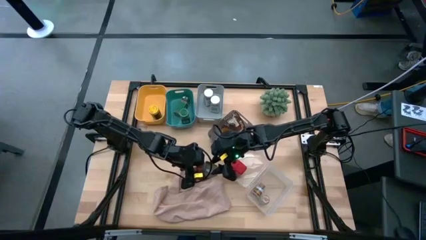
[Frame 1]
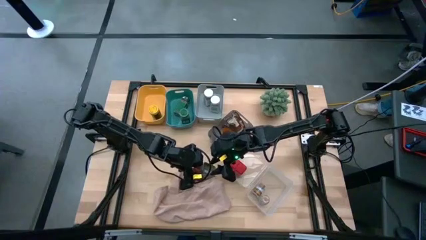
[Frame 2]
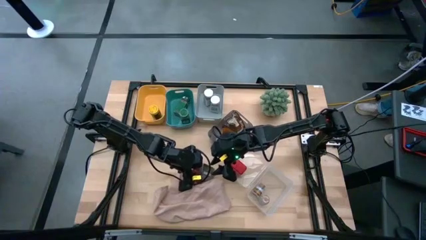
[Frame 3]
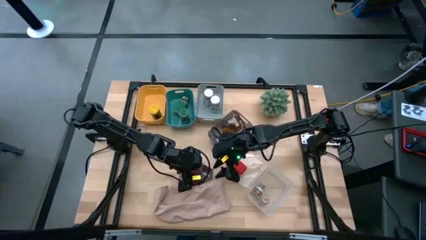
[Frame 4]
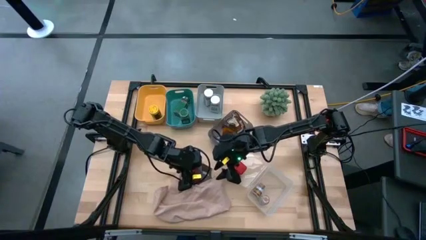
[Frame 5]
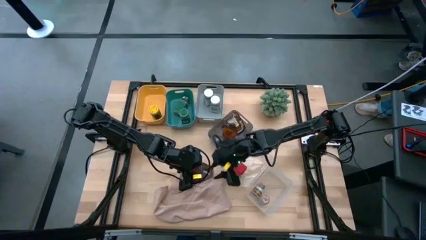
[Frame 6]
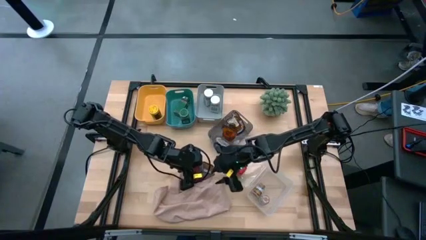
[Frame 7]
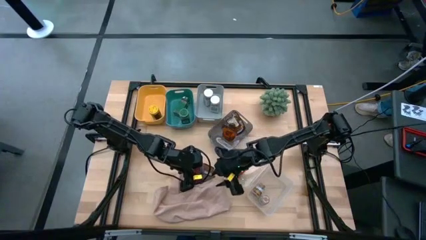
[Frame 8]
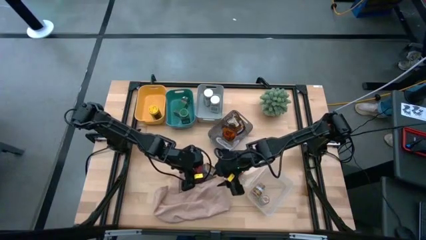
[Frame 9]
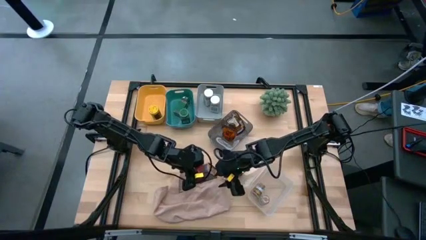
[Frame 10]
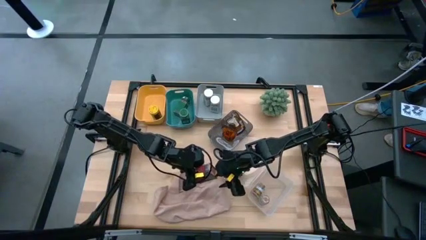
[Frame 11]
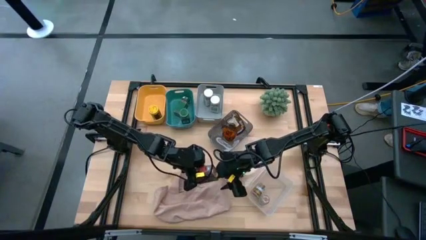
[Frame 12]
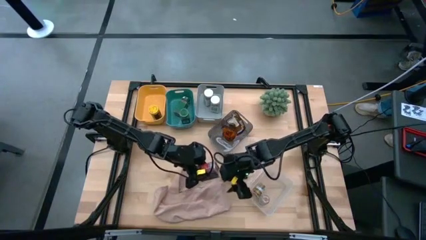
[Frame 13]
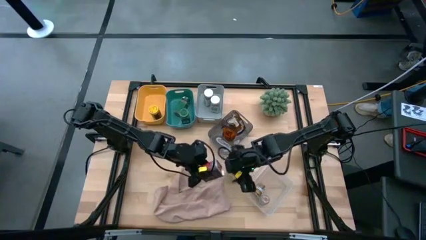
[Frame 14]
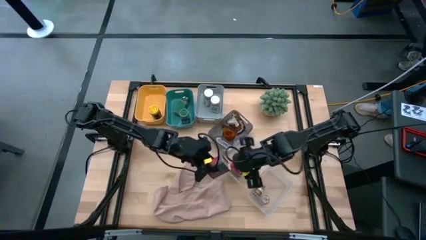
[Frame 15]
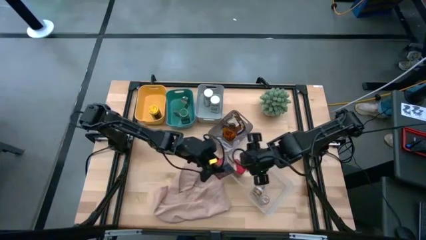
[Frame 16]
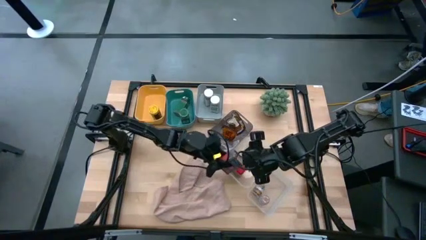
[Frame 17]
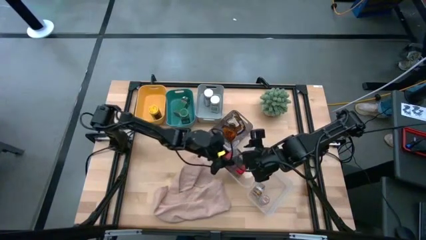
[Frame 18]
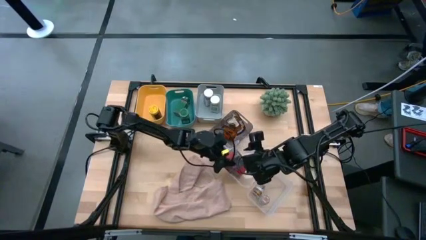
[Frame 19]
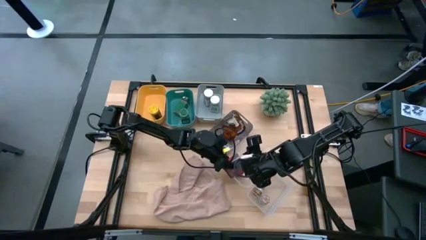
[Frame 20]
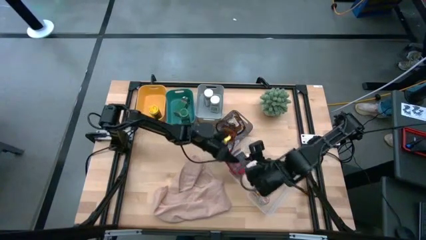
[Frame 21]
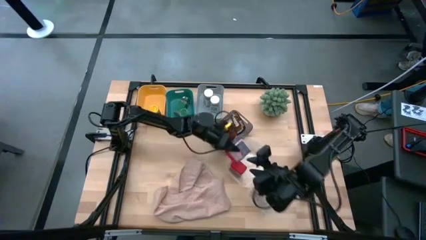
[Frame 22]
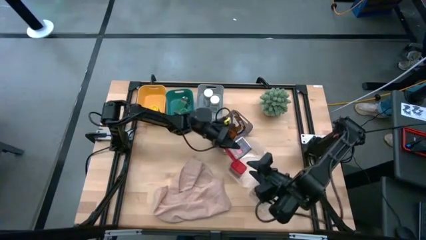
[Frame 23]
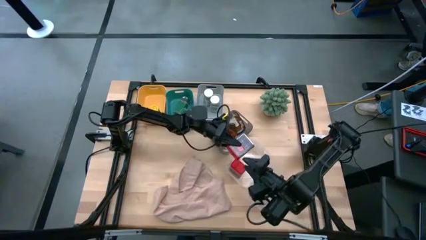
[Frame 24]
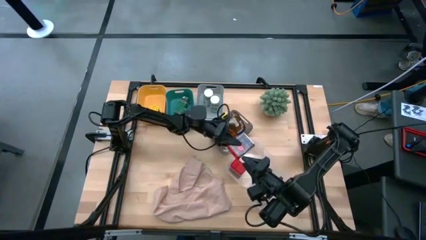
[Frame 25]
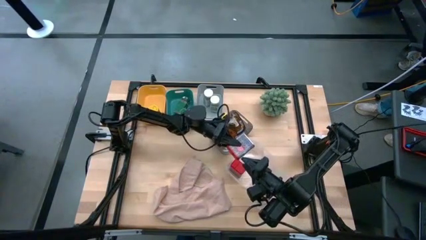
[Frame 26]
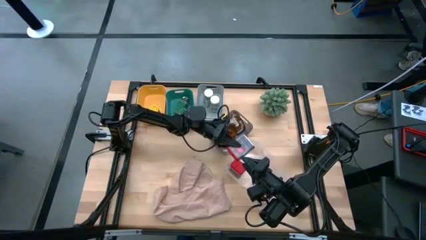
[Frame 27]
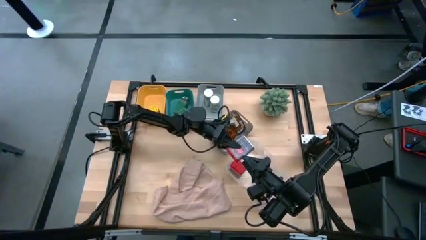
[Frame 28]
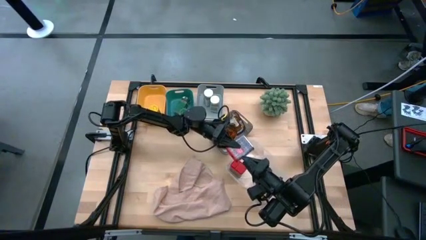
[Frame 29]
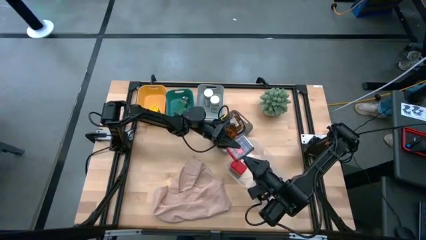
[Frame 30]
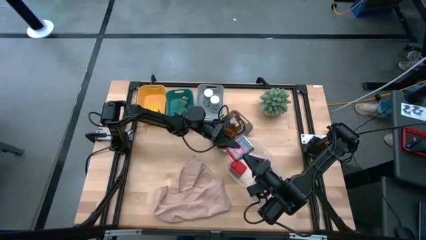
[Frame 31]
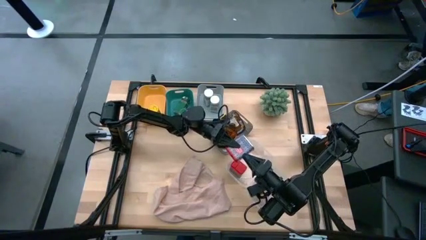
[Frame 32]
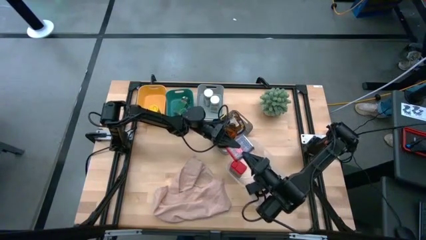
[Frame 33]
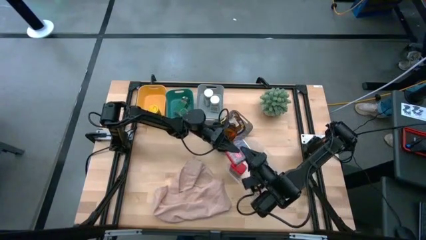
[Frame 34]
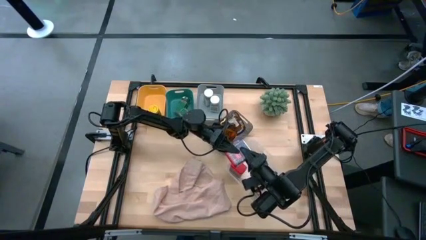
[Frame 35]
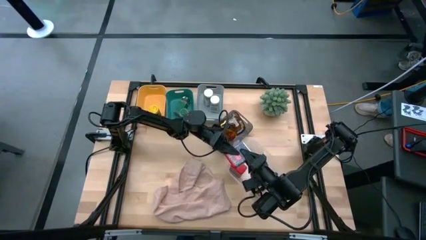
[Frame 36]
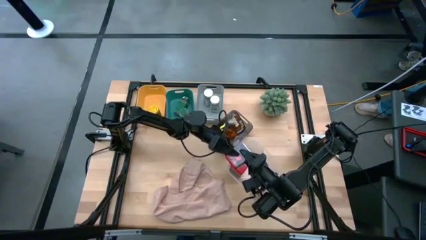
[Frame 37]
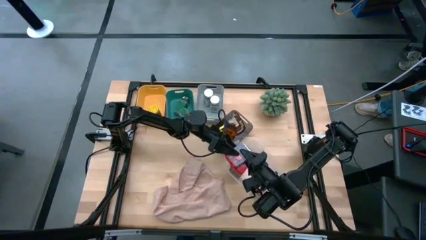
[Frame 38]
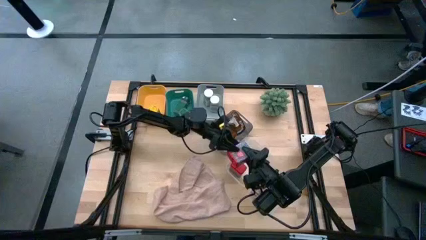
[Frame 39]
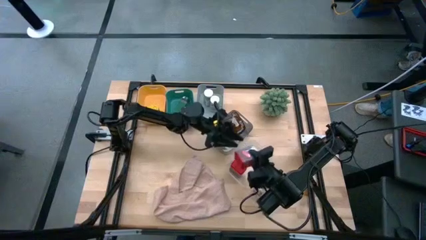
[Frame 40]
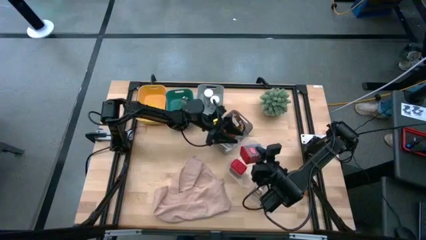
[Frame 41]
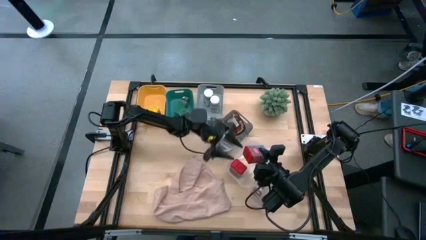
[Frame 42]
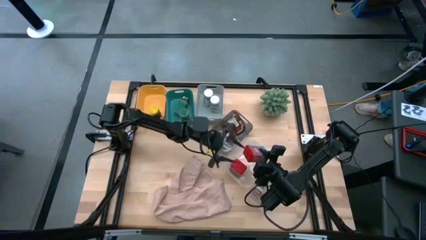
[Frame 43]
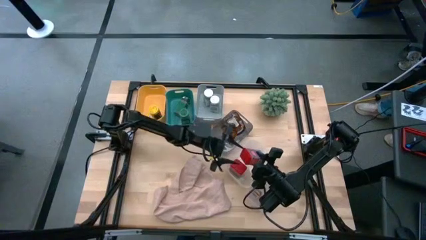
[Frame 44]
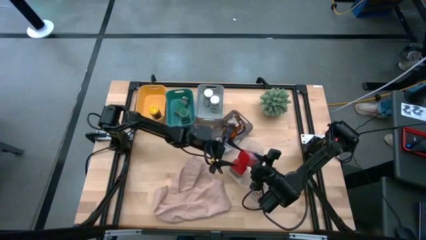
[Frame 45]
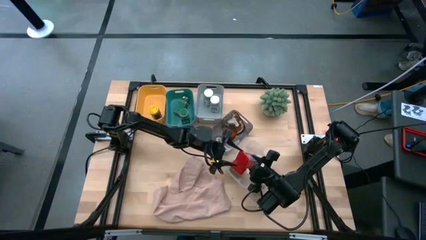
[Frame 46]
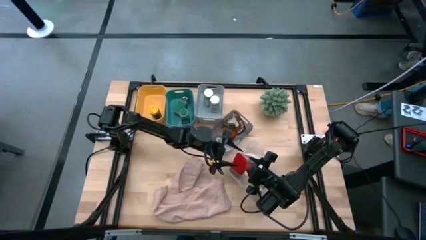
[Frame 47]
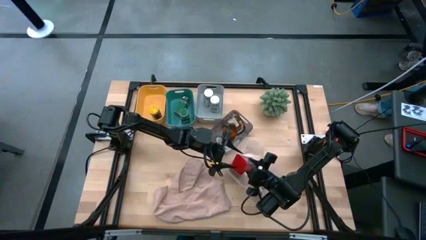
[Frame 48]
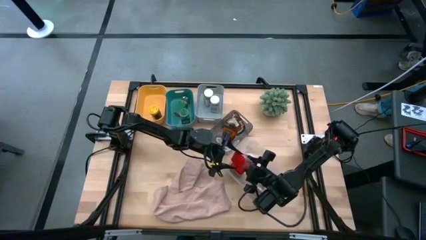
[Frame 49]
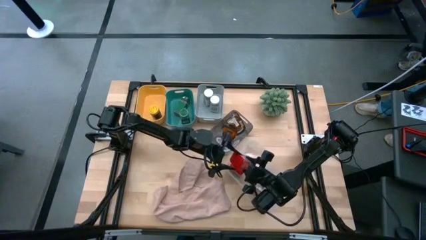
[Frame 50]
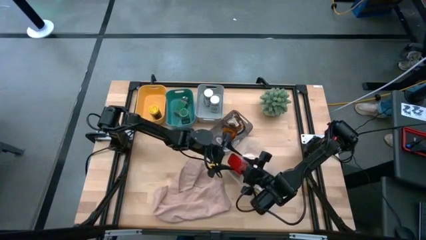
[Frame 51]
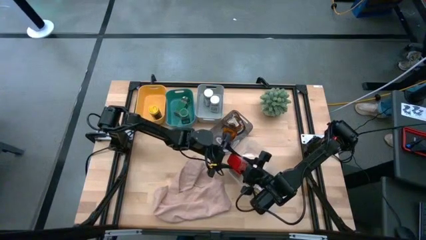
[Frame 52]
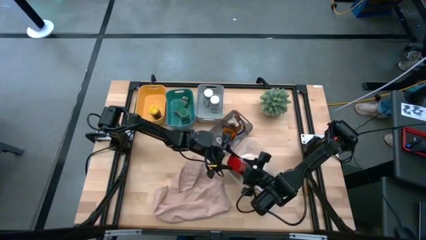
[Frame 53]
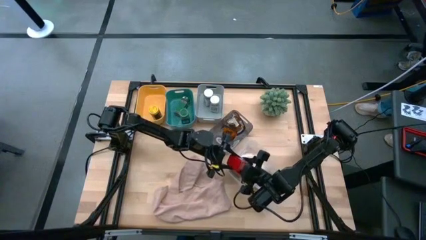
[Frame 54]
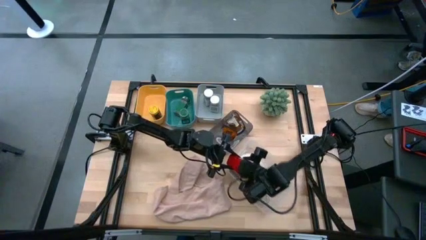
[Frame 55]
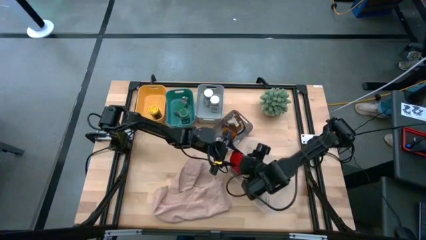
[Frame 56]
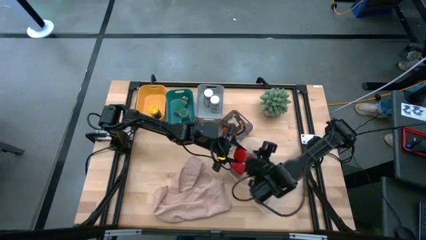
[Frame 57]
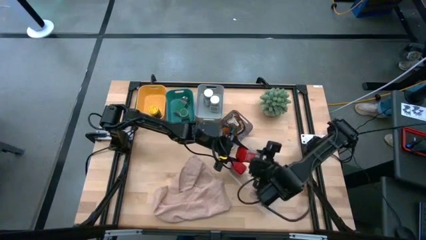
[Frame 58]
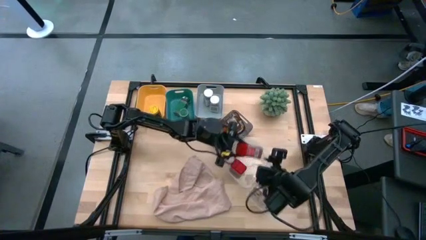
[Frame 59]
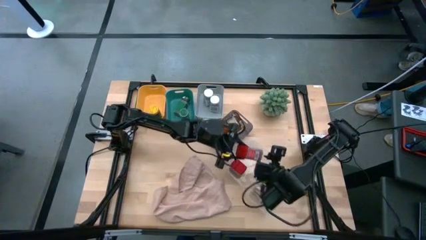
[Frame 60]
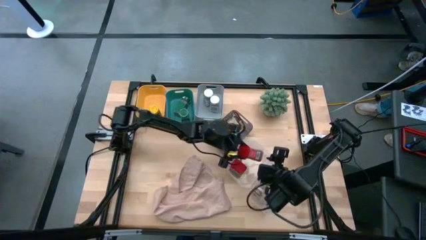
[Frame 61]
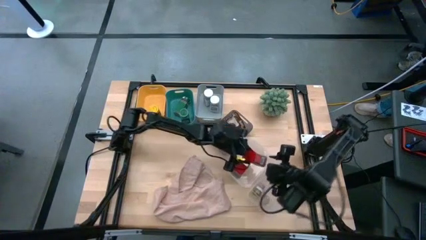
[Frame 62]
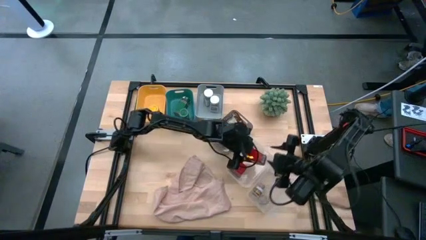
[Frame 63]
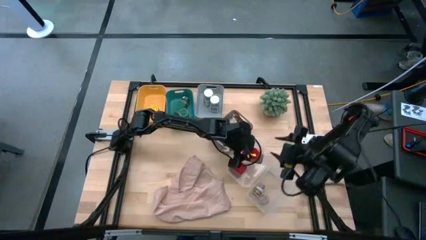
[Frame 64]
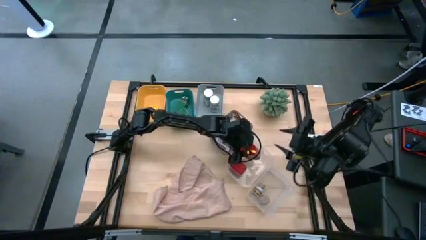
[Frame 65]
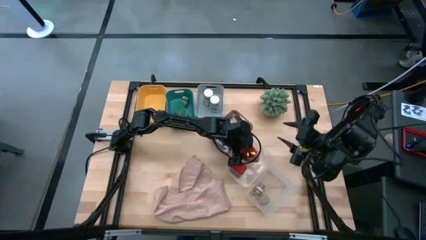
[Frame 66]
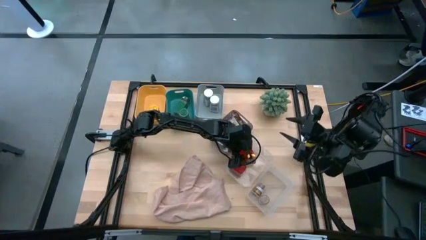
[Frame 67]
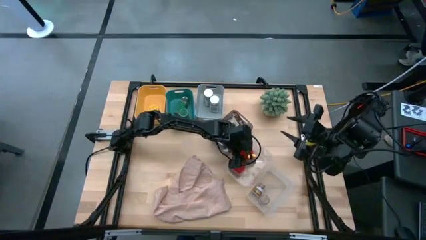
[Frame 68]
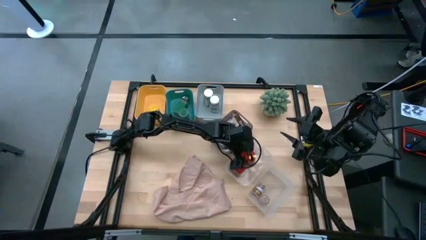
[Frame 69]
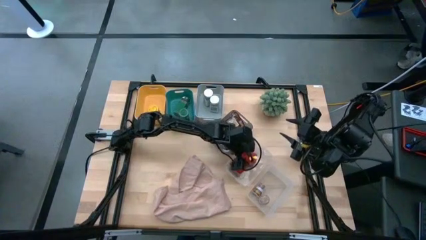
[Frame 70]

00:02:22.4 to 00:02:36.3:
Task: Sort spices by type
Put the red seasoning can into the left transparent bin
